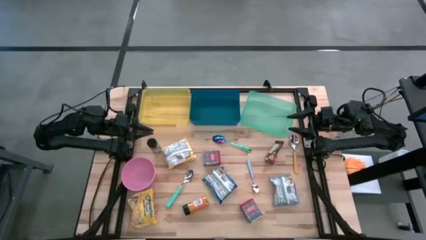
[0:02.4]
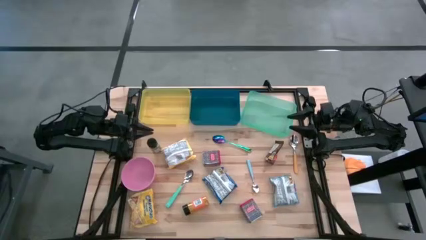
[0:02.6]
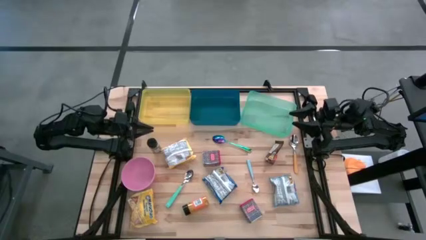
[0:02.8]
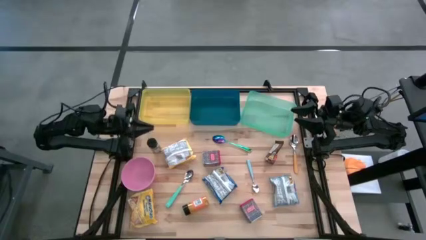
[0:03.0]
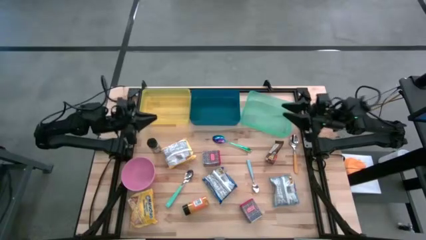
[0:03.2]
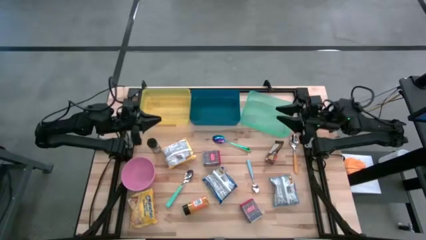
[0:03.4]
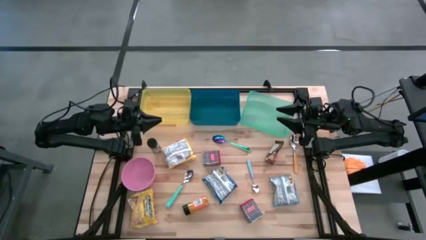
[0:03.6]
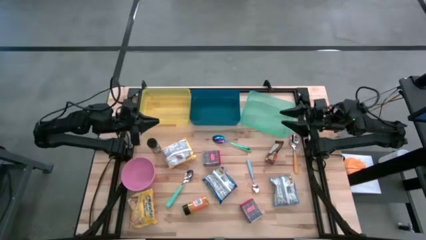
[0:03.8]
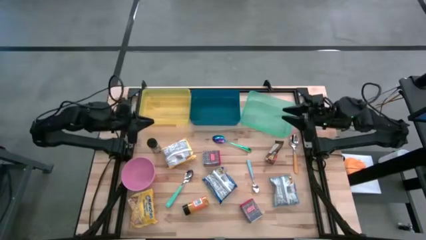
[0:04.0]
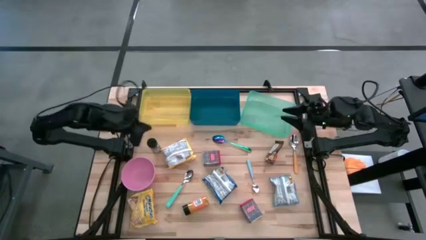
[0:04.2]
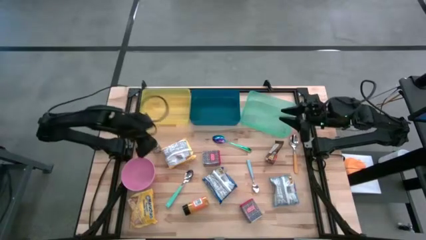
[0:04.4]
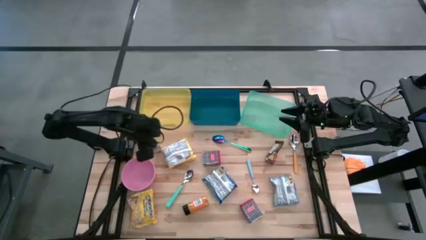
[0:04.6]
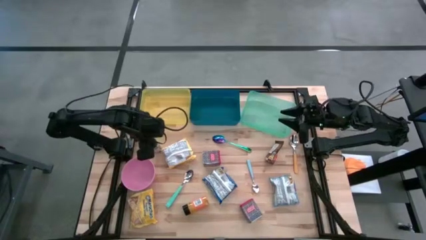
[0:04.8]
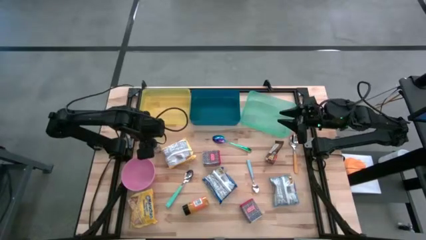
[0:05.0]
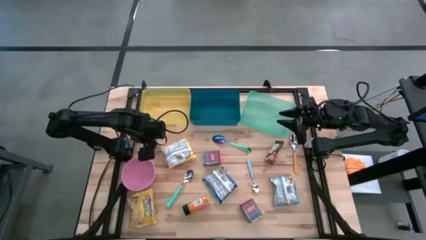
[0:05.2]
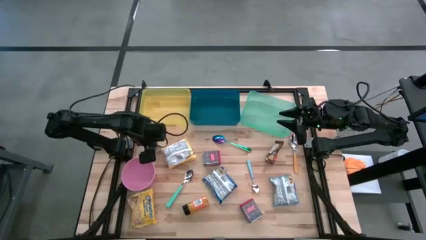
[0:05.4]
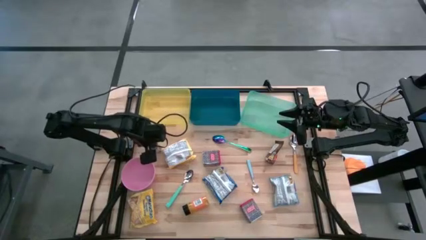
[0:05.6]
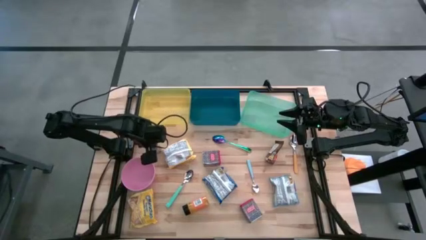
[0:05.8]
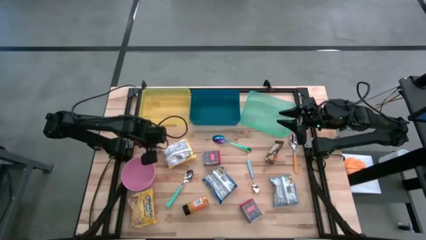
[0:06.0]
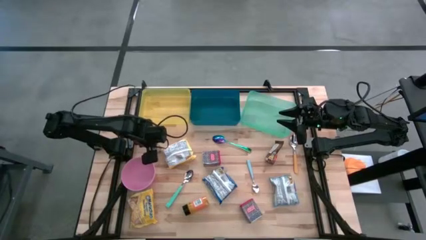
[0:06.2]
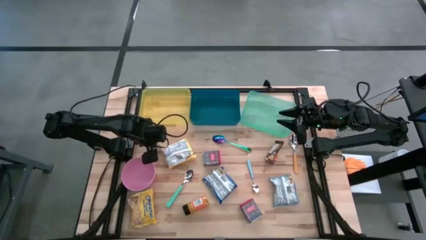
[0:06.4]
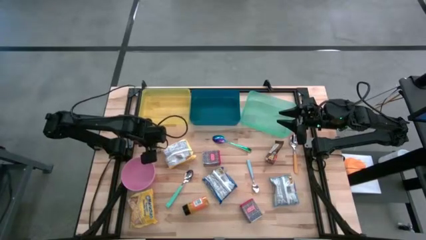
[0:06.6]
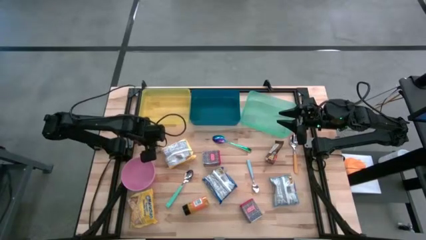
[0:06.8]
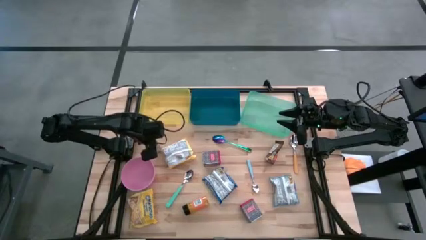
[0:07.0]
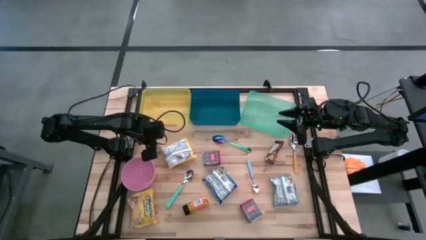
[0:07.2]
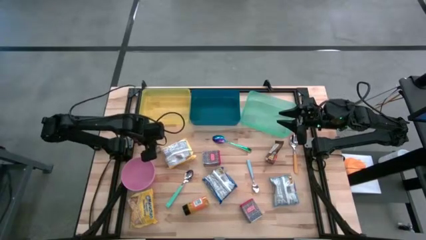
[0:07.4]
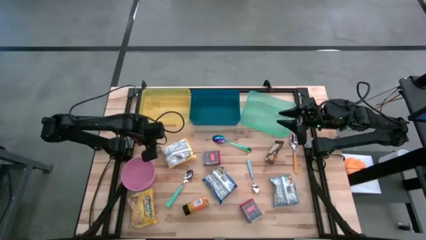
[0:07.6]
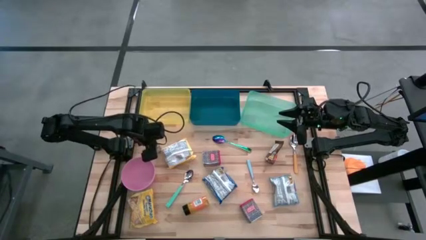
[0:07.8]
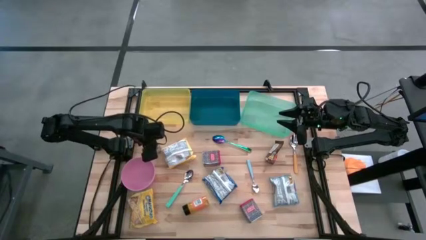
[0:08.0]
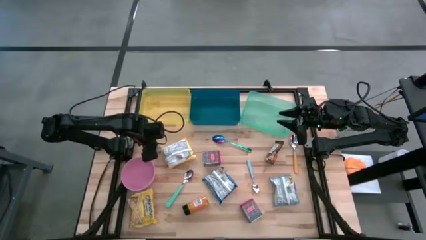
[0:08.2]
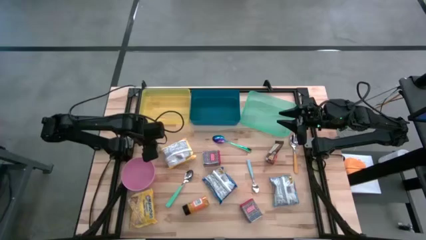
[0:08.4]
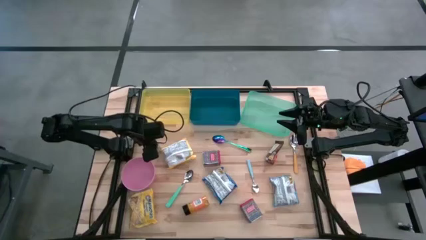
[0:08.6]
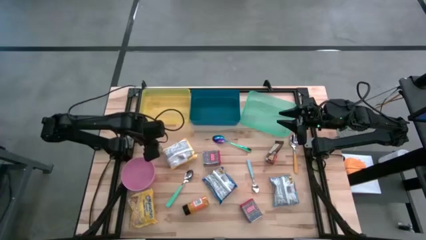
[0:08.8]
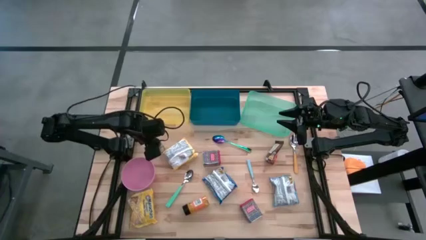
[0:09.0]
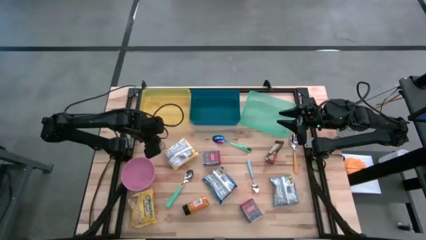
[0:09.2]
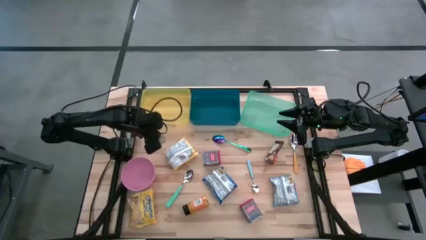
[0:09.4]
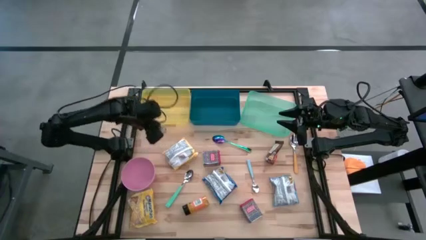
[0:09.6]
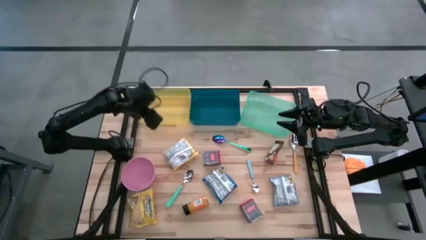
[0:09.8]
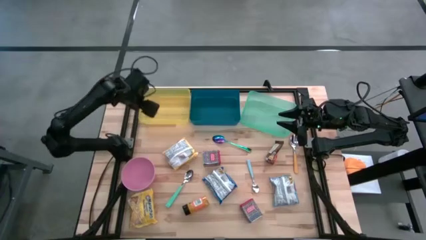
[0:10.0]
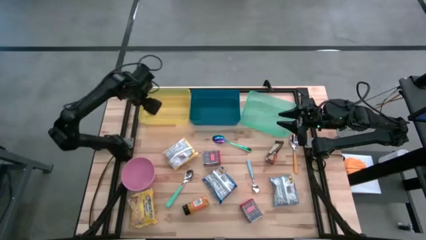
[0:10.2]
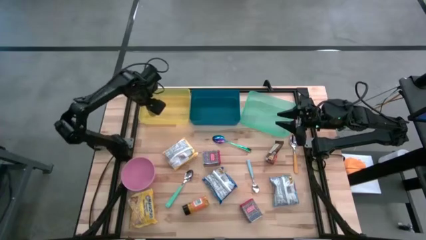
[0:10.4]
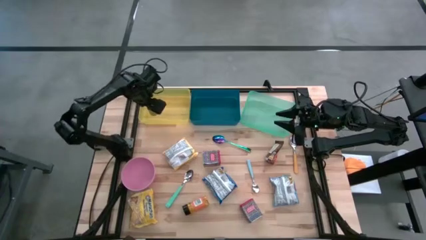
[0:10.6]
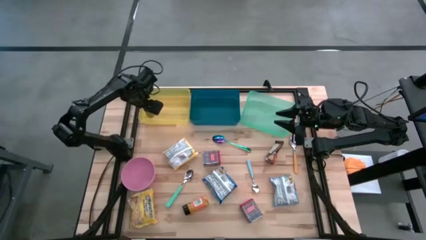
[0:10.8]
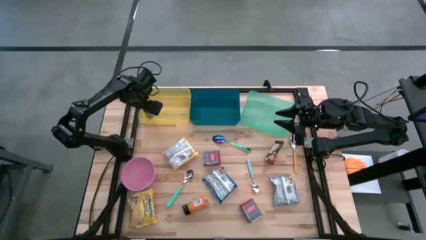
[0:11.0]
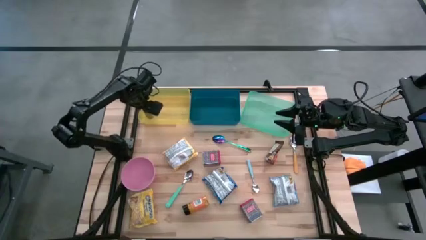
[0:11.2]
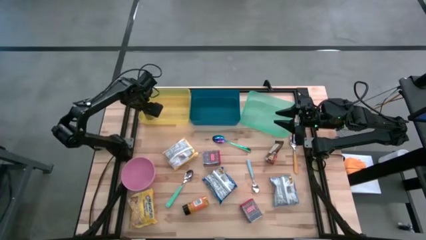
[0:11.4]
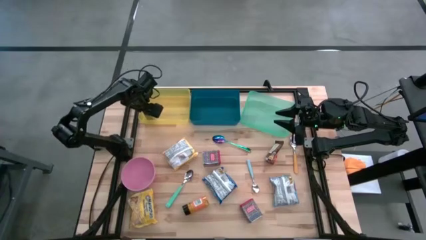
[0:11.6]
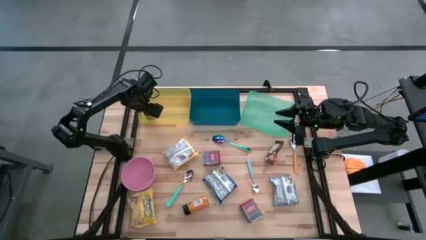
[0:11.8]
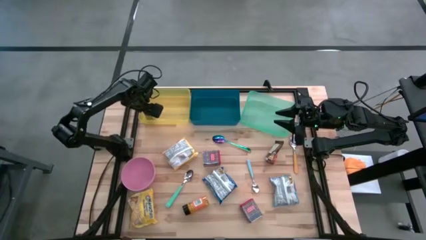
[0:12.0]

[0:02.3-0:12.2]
Put the black seasoning bottle into the yellow bin

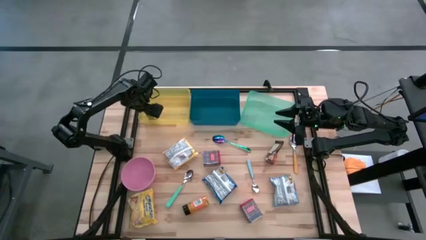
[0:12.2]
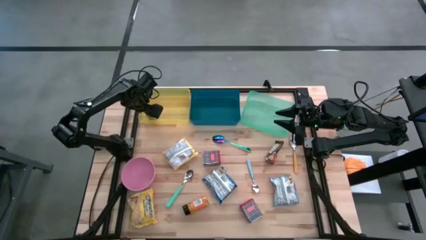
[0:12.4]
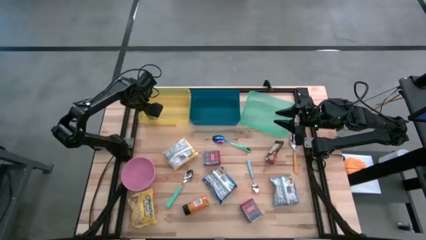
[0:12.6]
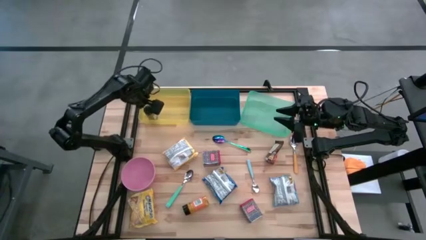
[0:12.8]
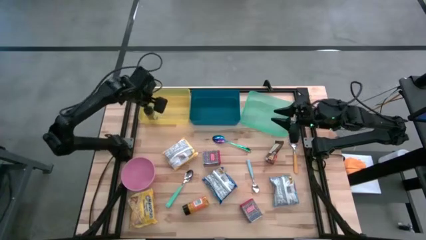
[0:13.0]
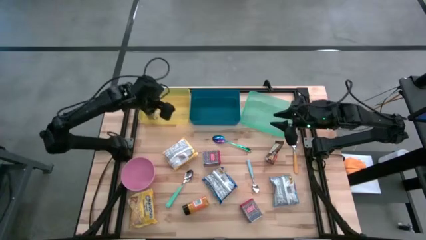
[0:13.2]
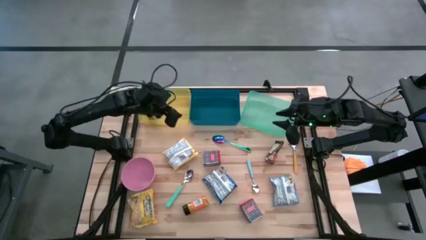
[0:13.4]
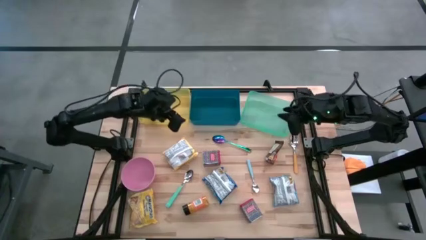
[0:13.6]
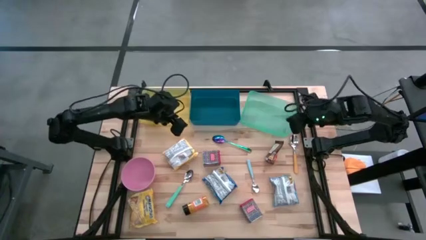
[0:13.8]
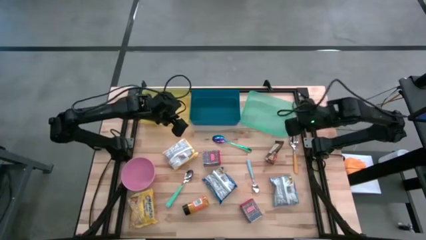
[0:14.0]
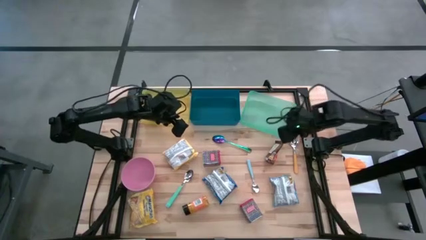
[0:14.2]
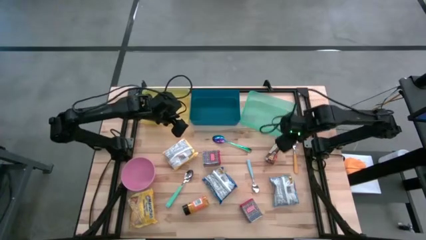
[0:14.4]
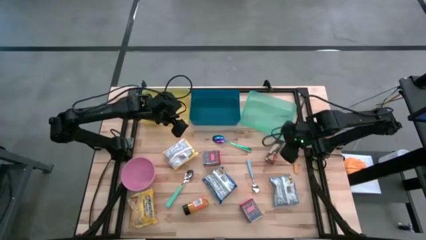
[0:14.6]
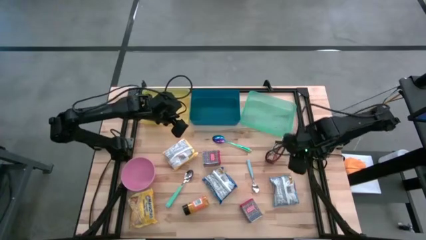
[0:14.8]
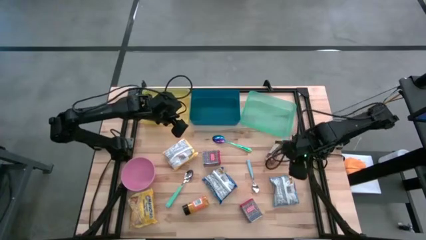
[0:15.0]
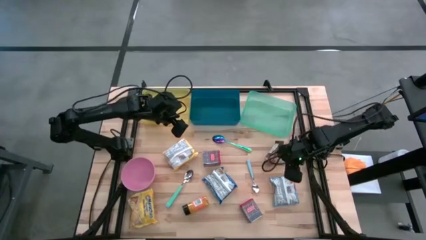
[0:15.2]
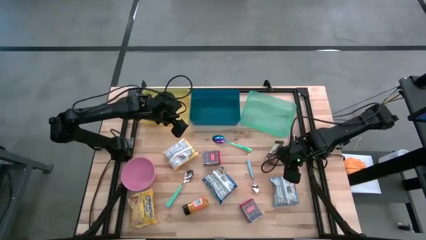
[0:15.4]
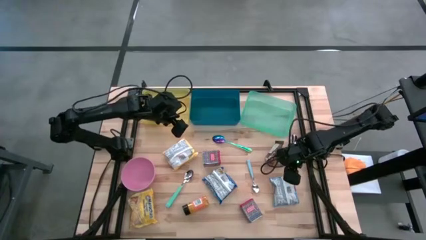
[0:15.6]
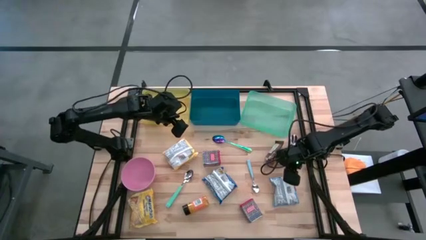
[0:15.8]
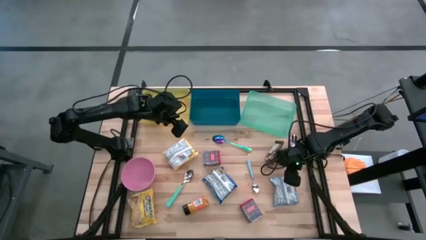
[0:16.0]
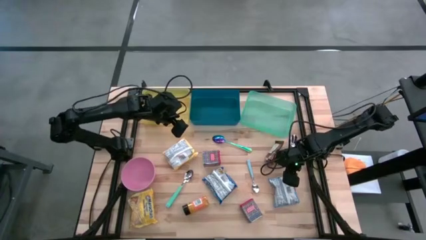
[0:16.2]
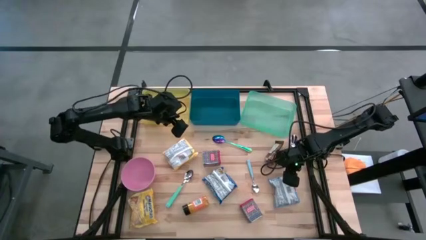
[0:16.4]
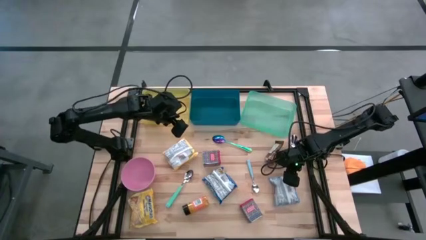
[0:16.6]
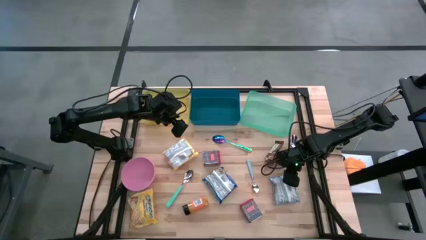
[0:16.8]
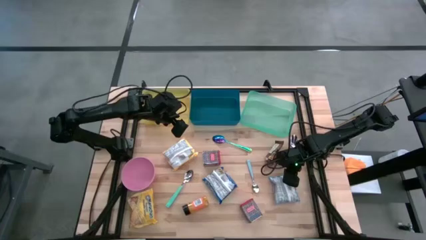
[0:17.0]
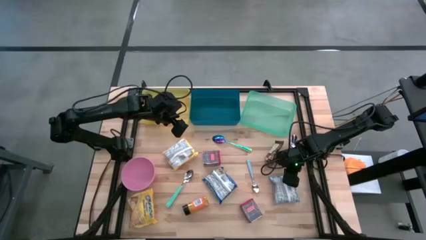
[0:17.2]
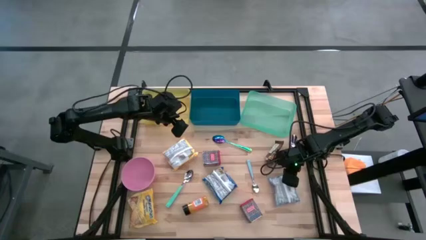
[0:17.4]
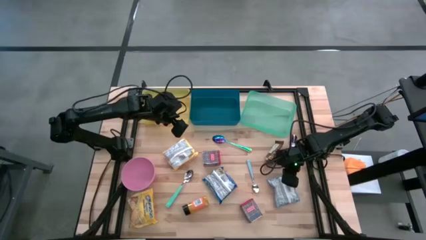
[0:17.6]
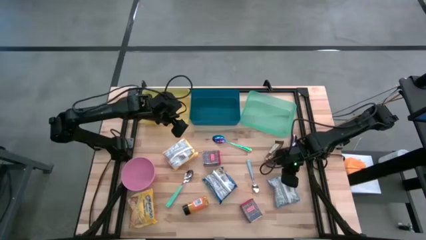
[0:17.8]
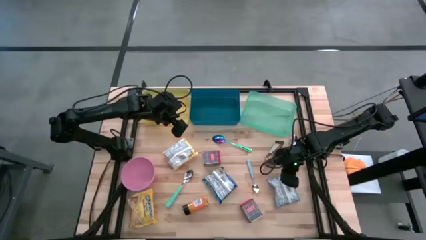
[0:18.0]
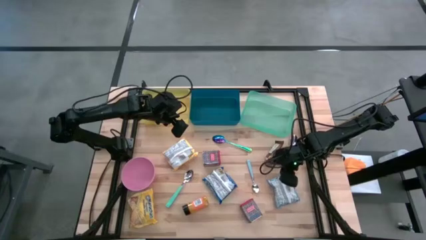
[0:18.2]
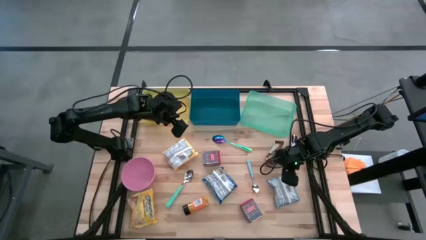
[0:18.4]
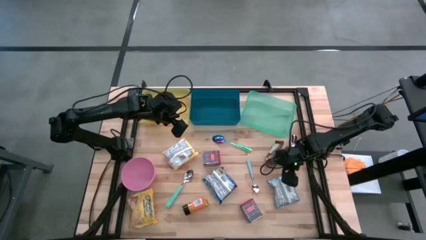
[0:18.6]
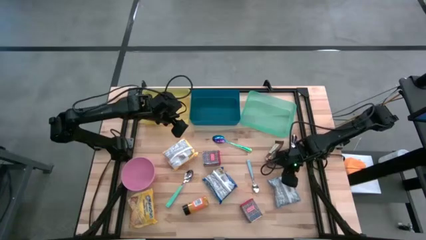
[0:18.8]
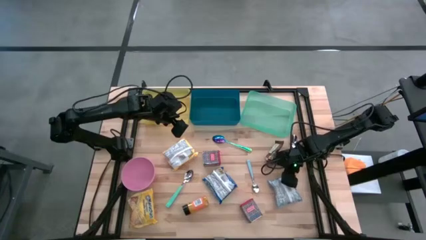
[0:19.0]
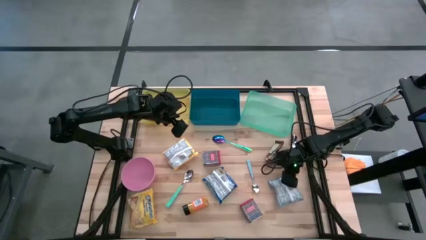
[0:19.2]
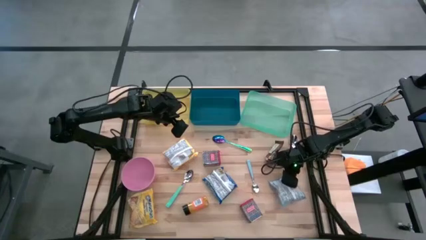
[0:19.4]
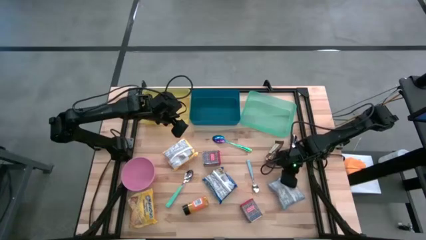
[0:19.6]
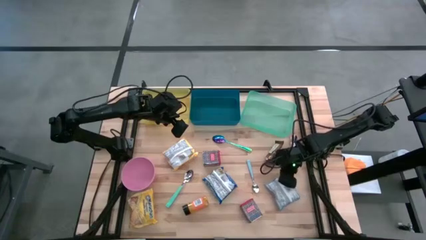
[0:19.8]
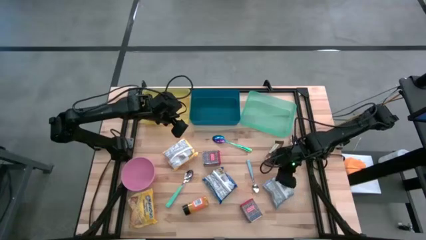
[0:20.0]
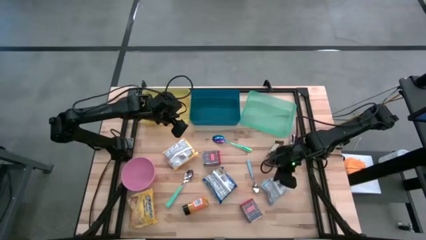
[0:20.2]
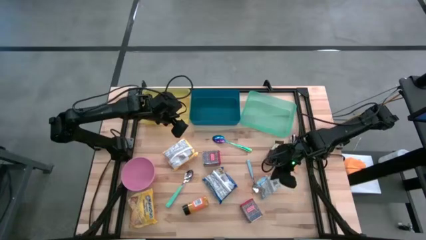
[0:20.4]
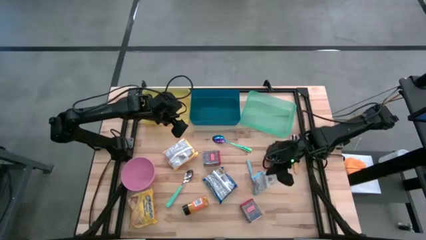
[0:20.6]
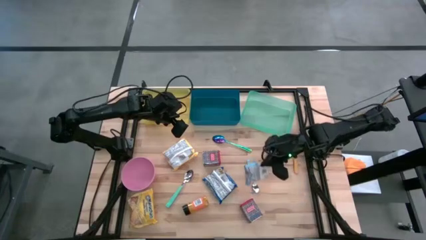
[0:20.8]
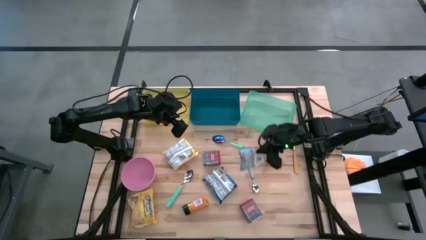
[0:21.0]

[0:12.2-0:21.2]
Put the light blue noodle pack into the green bin
